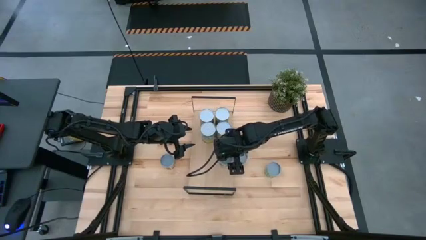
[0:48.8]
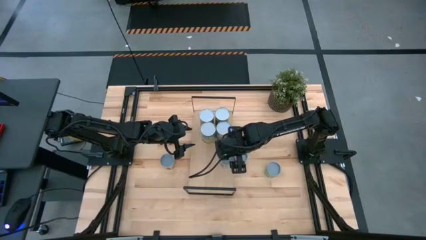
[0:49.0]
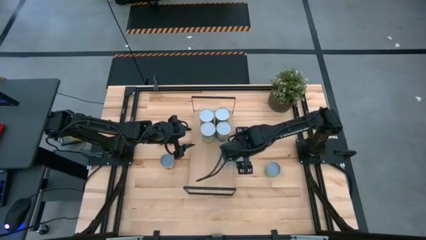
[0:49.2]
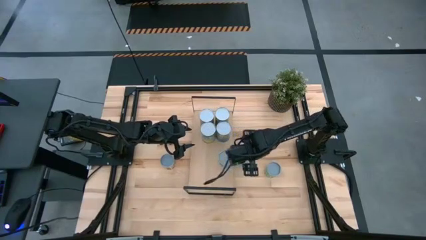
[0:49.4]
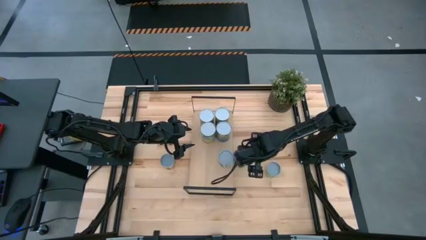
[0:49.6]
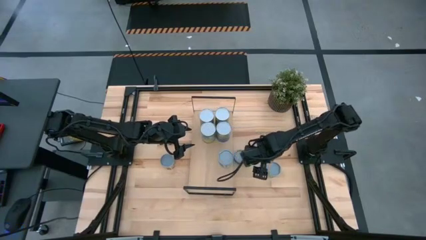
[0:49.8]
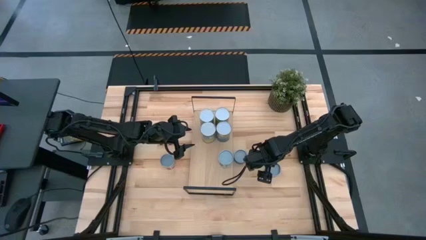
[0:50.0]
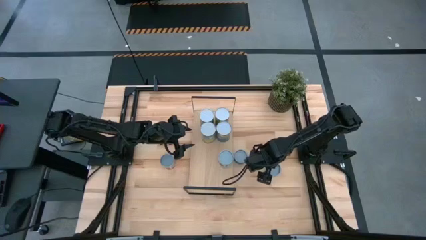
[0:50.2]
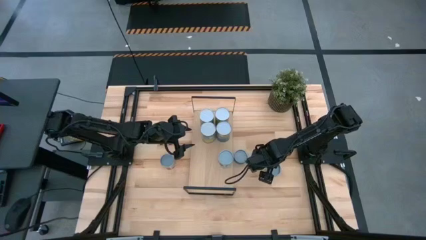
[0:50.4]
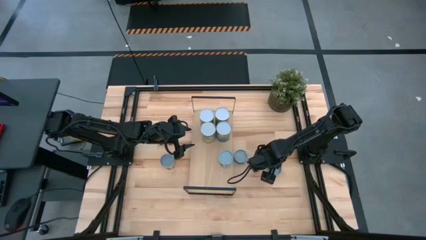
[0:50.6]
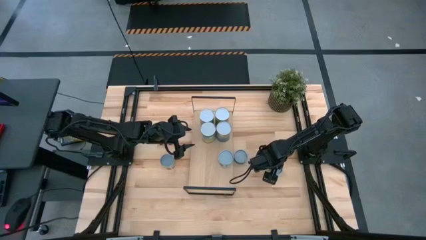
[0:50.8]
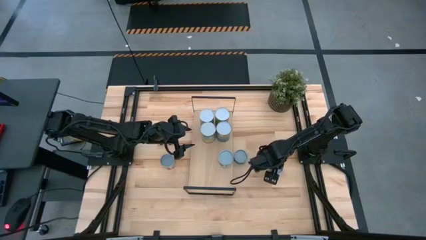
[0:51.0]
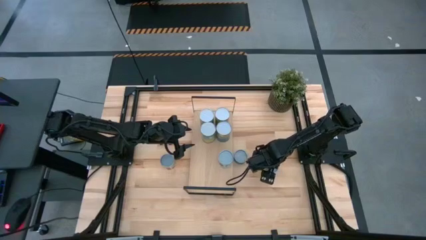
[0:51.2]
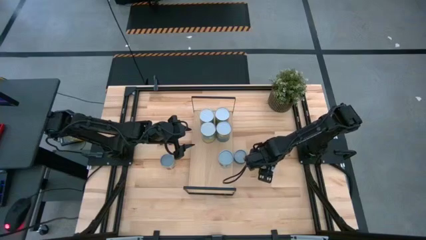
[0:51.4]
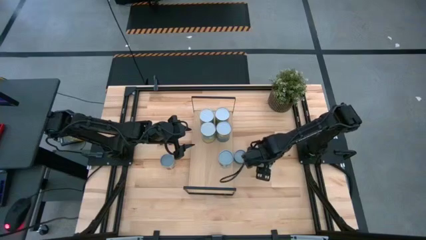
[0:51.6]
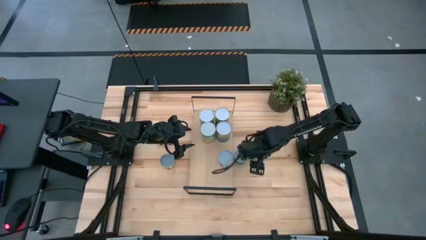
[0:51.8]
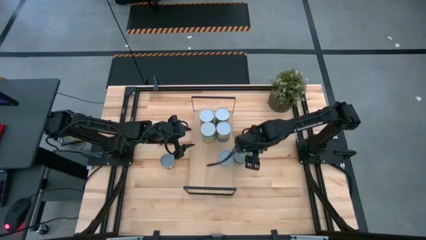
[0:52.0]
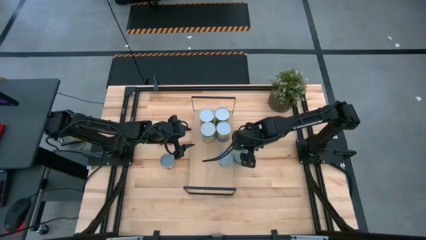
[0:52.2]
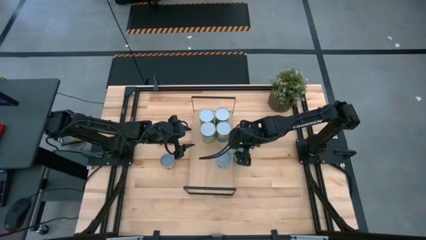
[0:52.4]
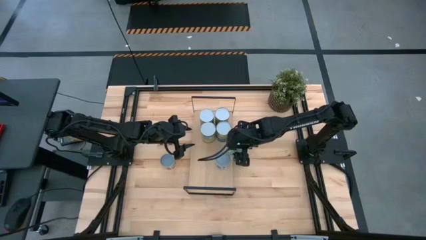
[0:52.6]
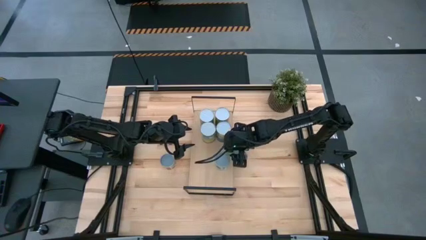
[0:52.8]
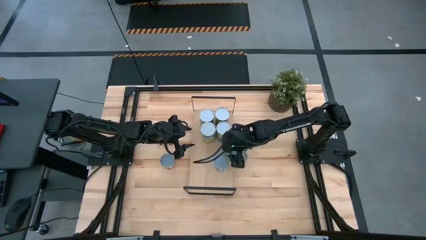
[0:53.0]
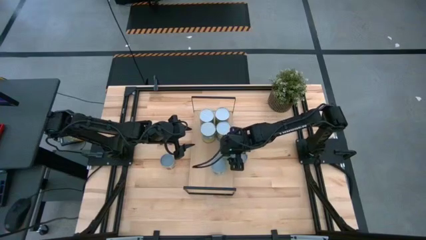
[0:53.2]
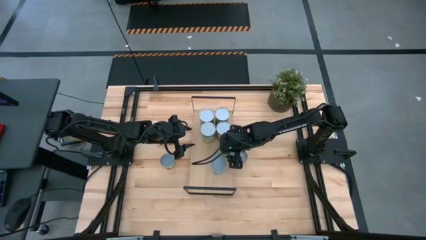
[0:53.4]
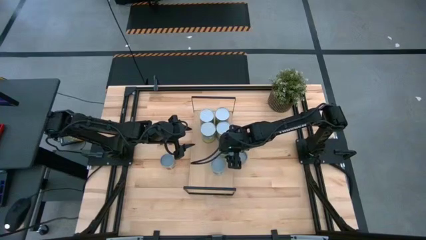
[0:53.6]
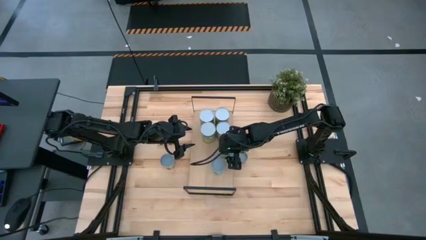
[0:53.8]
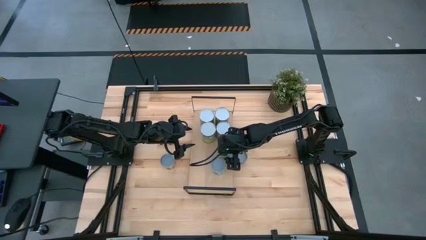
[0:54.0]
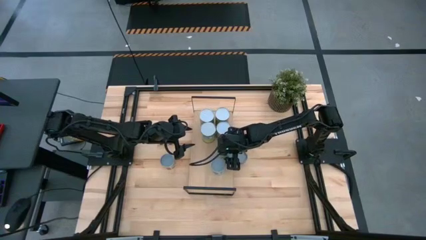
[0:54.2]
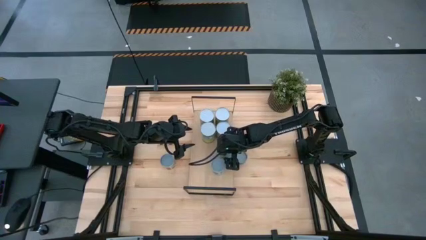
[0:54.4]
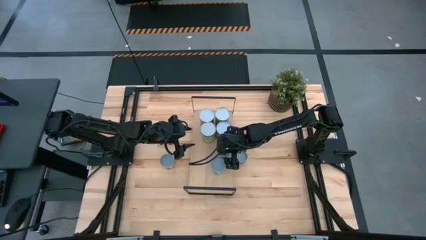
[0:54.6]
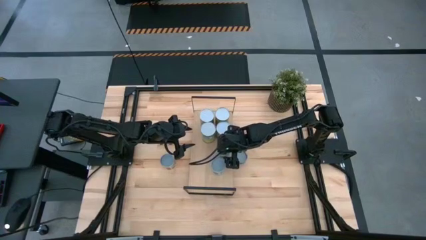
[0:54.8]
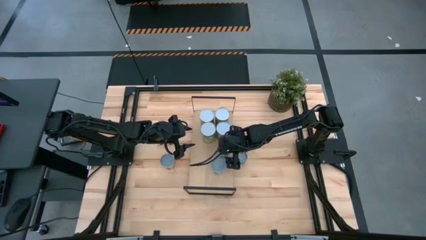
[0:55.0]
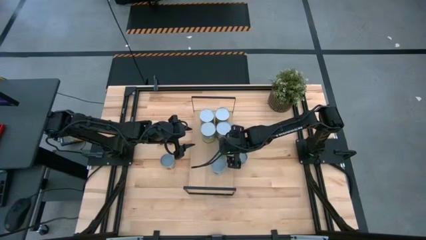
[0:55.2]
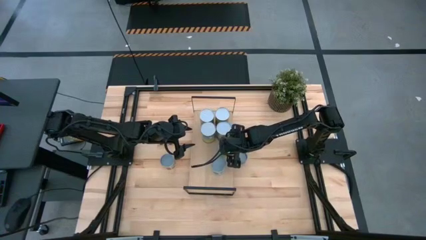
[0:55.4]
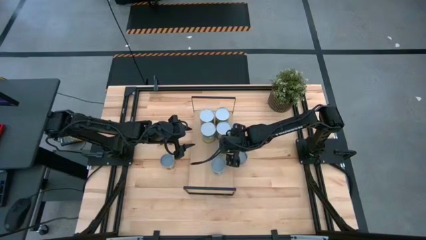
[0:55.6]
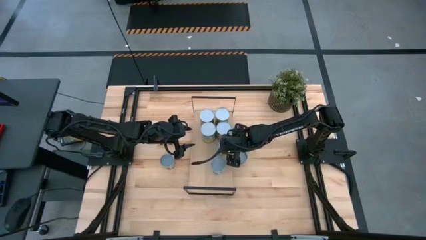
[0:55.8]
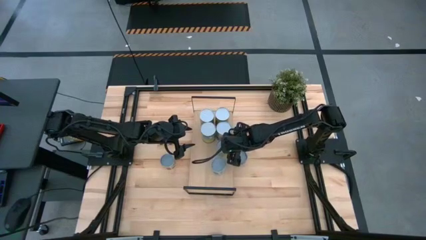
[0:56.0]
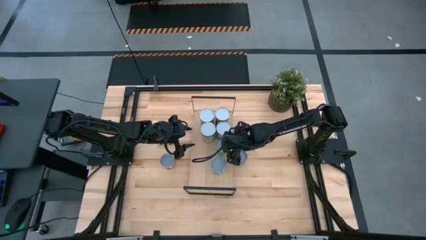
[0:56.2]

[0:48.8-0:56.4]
Task: Pick and place cans onto a shelf
Put the canned green peas on the shelf

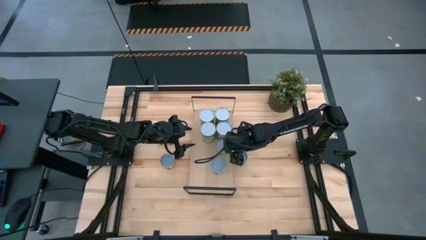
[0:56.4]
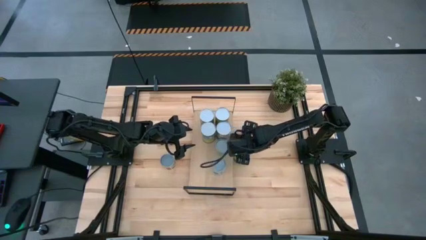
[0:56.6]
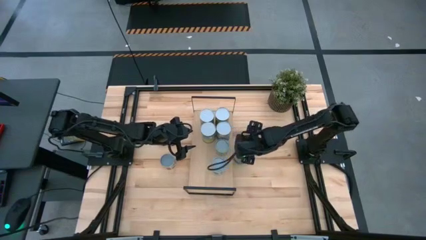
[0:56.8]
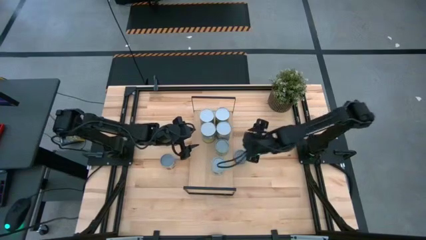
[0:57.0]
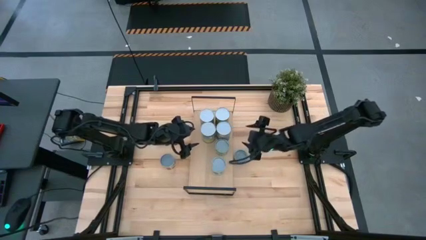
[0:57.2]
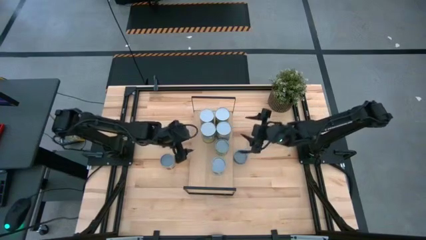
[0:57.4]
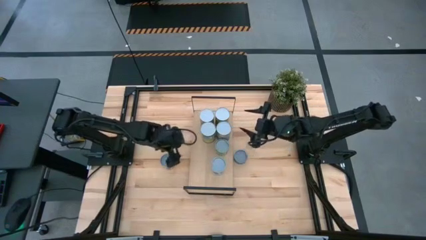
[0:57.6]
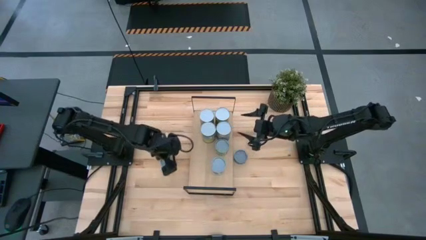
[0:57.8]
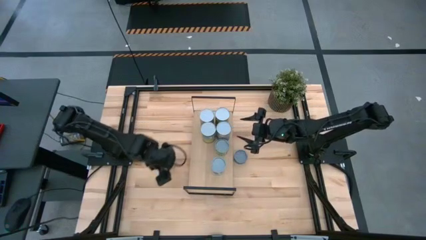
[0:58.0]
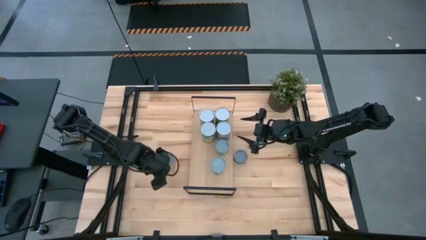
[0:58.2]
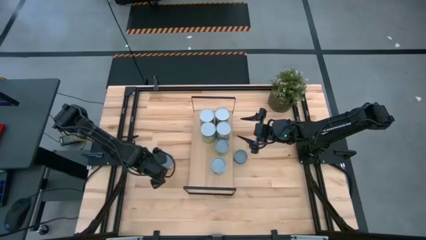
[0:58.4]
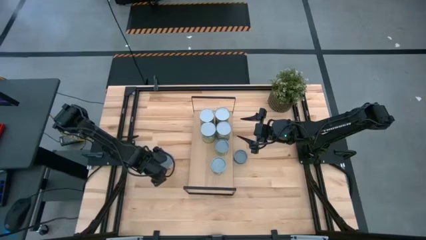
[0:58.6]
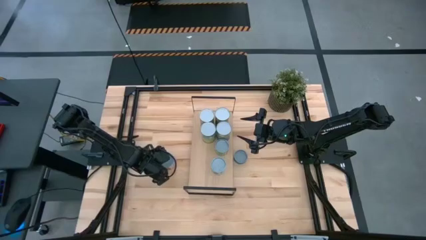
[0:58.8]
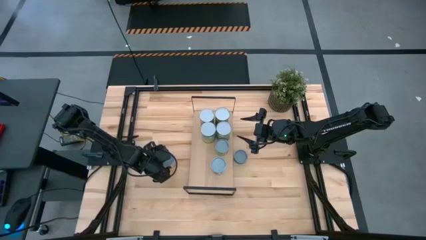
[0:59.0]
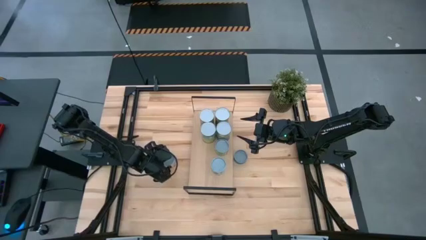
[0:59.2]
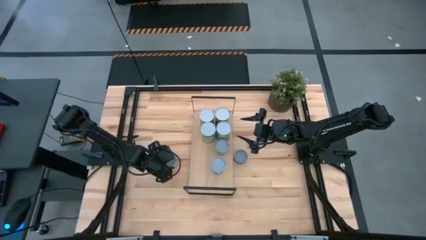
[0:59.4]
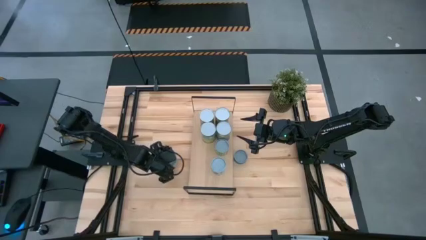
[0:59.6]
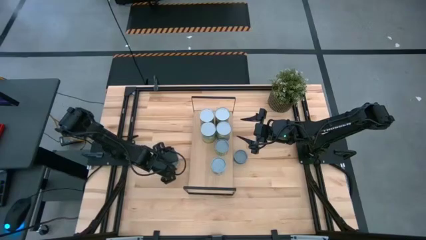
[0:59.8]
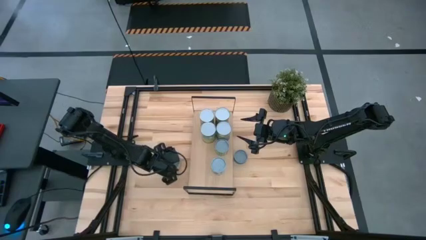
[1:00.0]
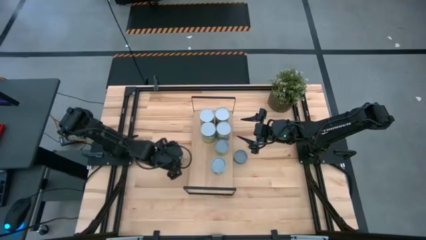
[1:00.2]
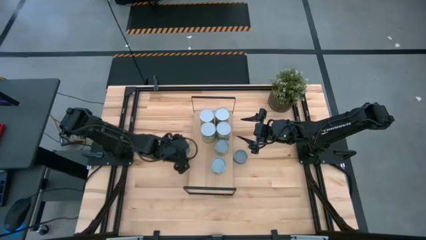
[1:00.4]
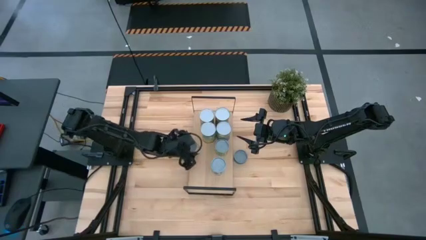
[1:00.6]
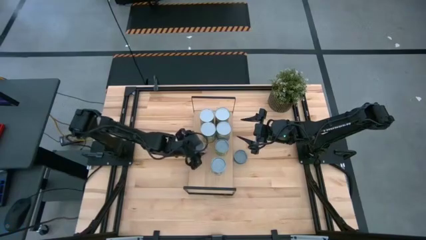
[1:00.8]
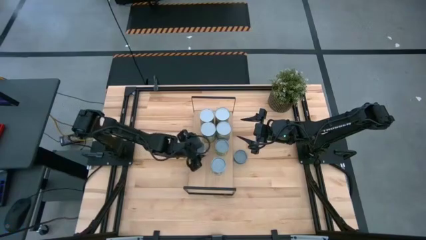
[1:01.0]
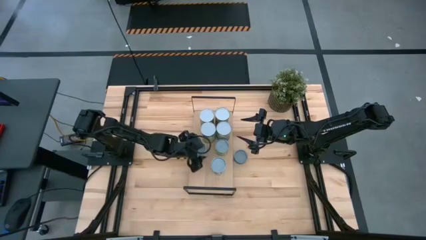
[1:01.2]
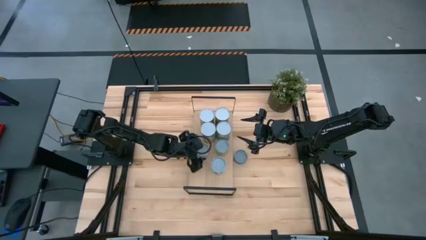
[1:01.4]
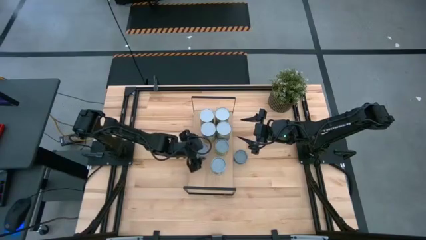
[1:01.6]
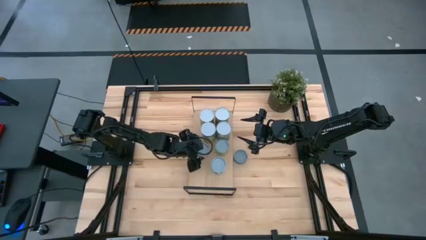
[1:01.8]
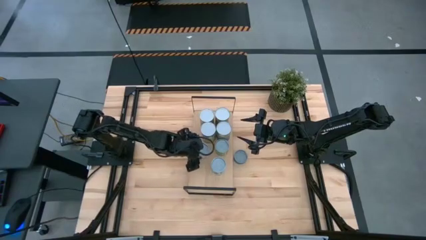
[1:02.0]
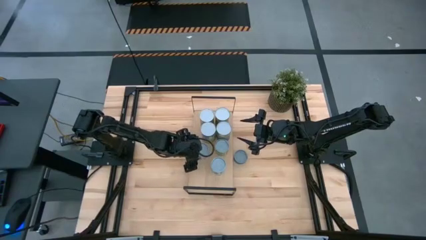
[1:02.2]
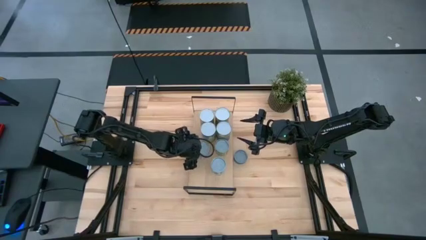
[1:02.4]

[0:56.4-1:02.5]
Put the canned diced tomatoes on the shelf
